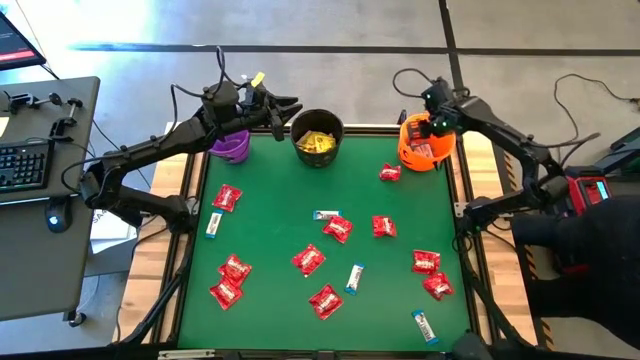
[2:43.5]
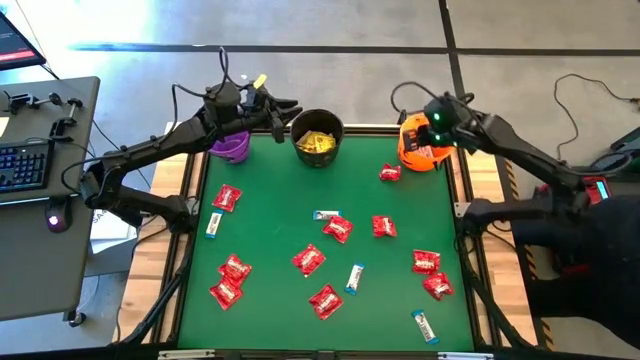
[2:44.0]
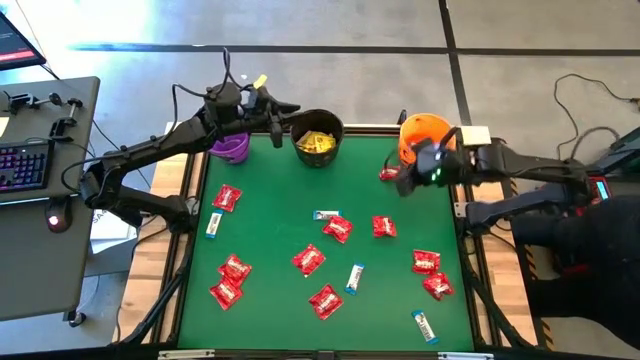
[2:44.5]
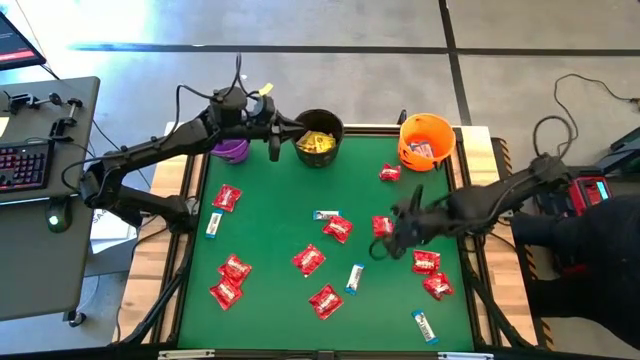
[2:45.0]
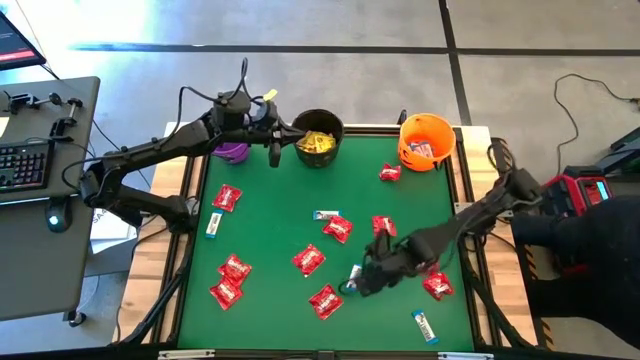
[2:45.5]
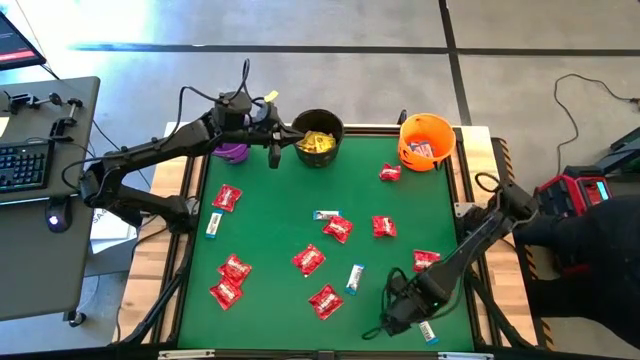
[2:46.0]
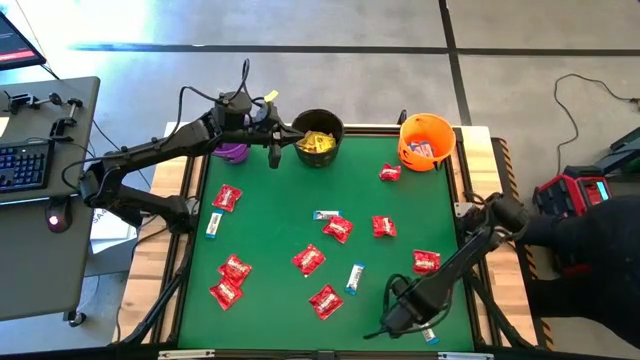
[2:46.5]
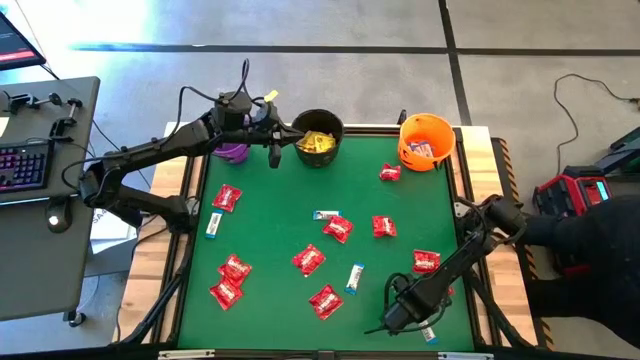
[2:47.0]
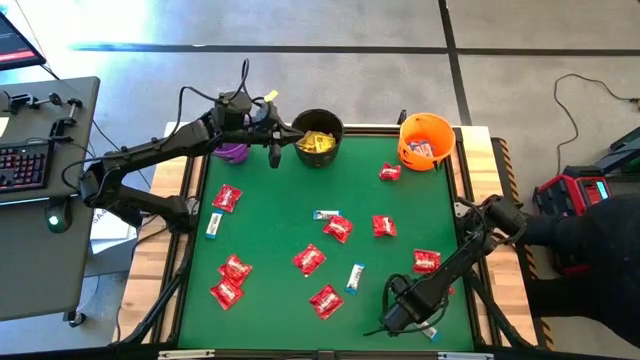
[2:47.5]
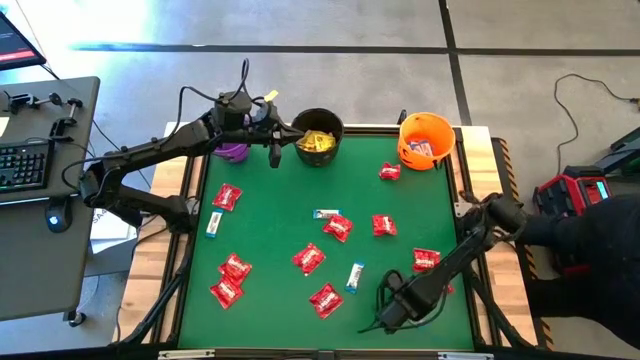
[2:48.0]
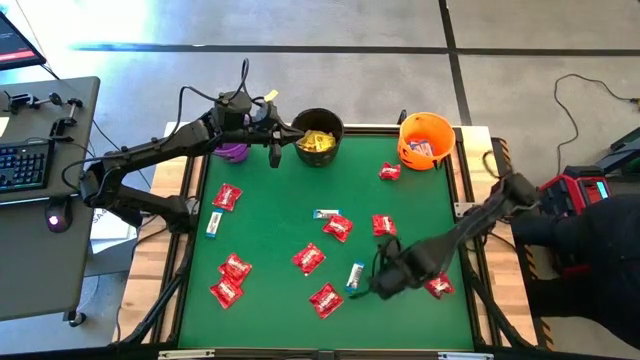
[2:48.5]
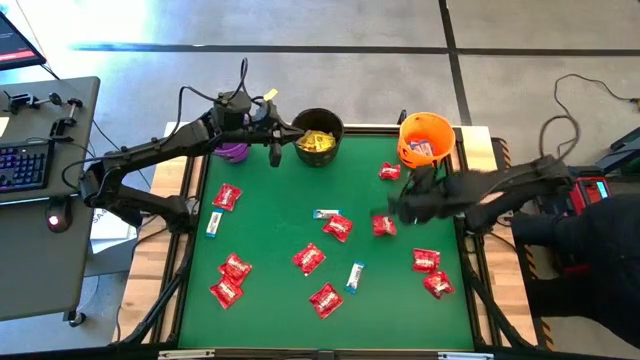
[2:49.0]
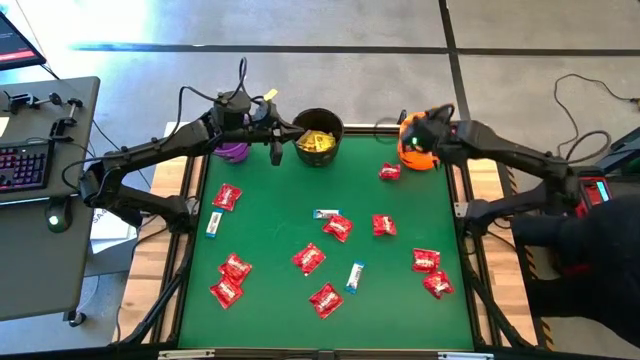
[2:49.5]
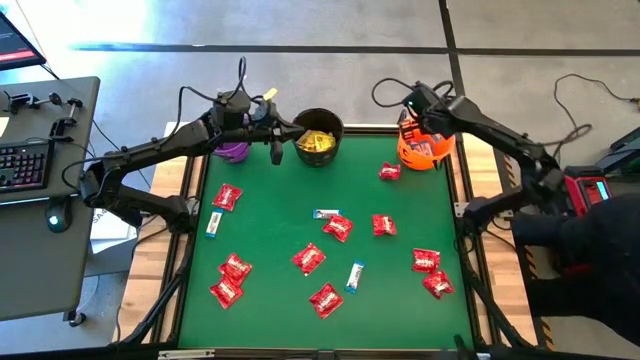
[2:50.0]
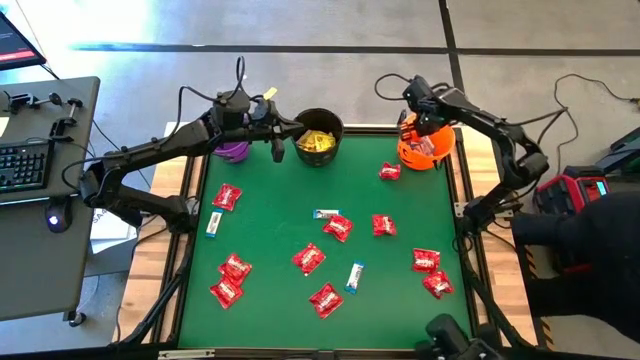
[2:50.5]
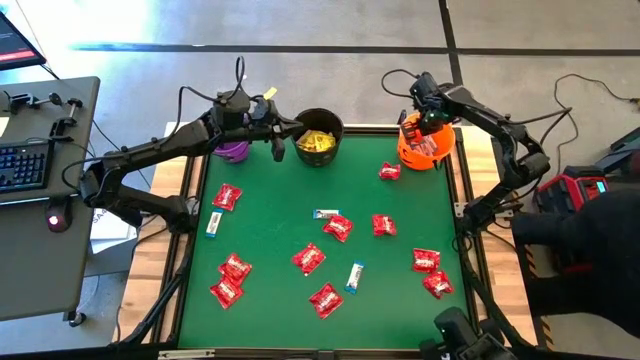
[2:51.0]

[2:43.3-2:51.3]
Task: Sort candy by brand, put in halloween buckets
Put the blue chocolate bar into the orange bucket

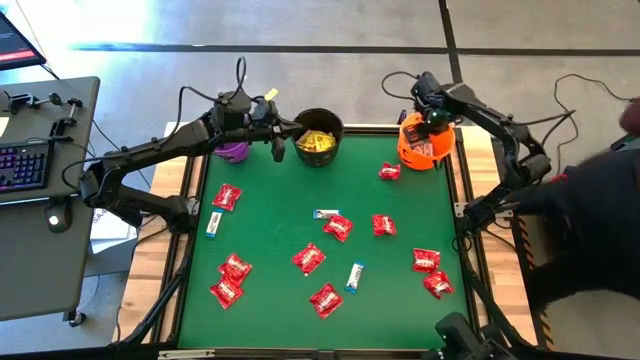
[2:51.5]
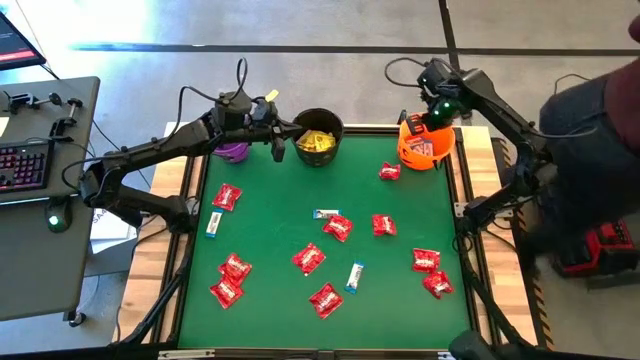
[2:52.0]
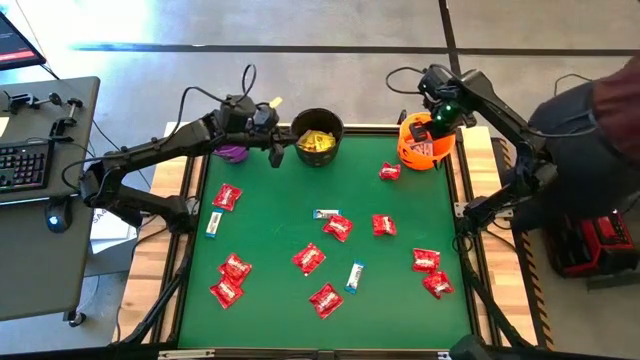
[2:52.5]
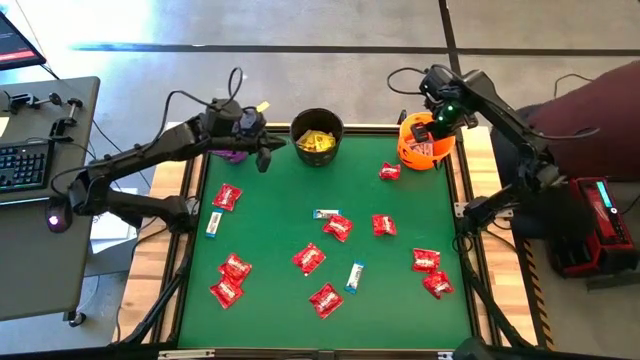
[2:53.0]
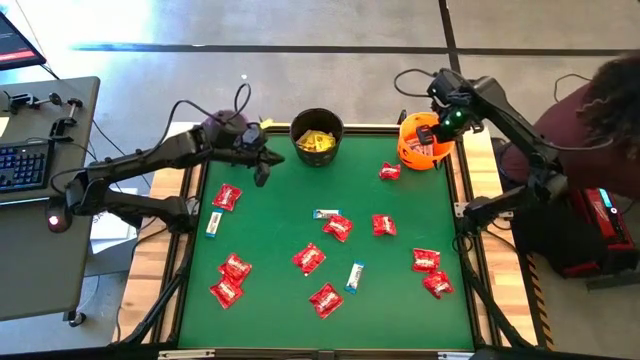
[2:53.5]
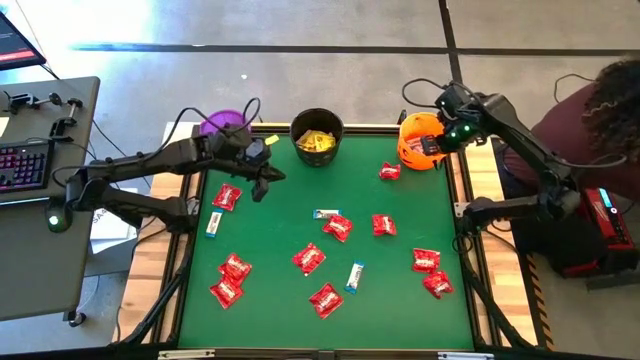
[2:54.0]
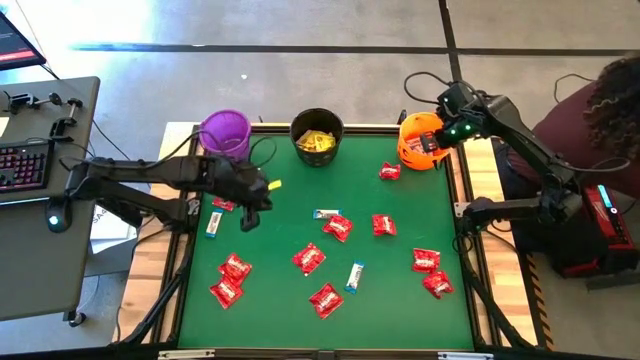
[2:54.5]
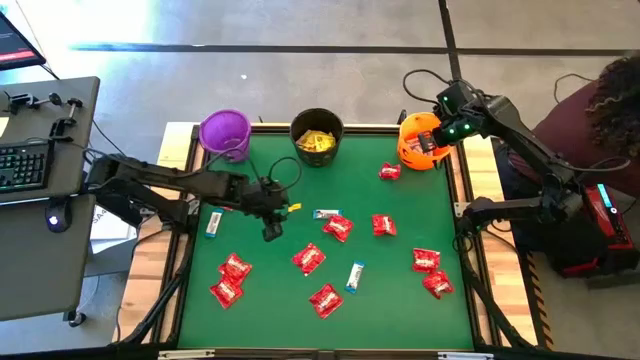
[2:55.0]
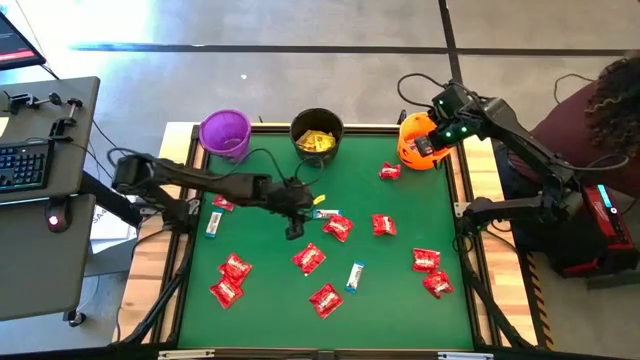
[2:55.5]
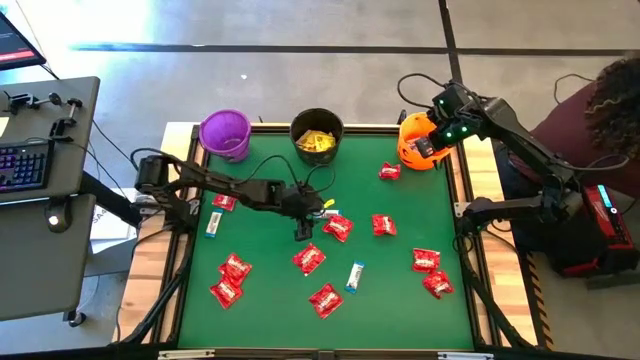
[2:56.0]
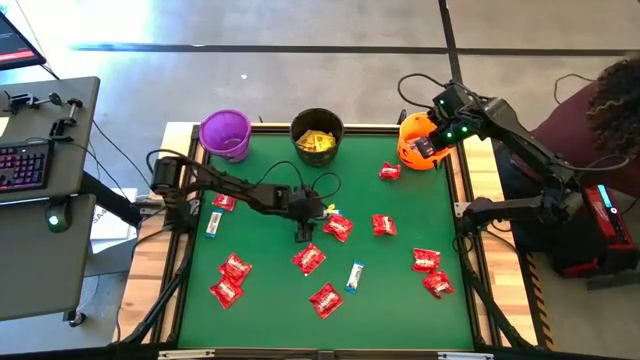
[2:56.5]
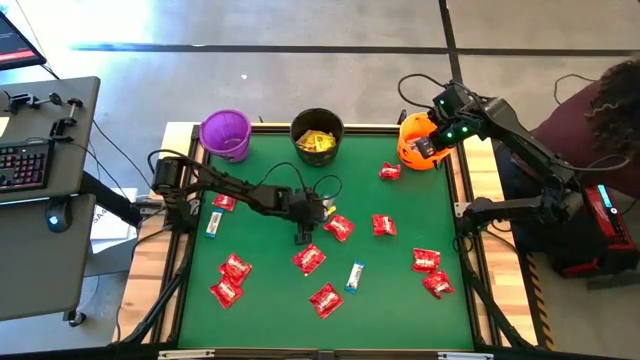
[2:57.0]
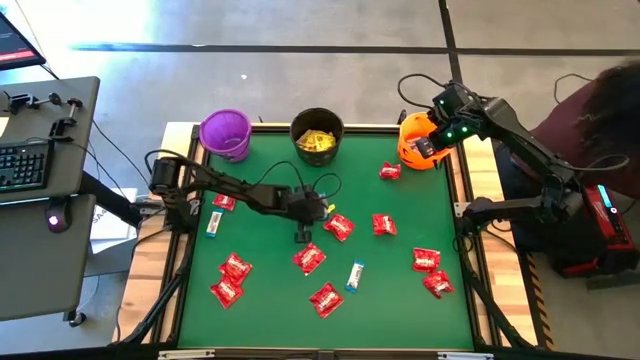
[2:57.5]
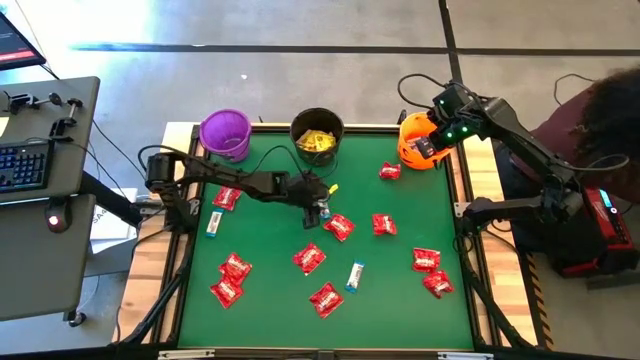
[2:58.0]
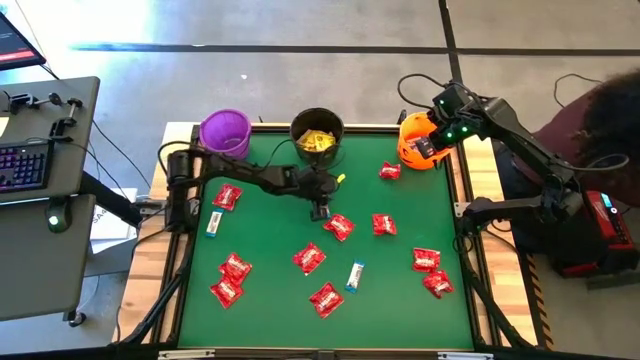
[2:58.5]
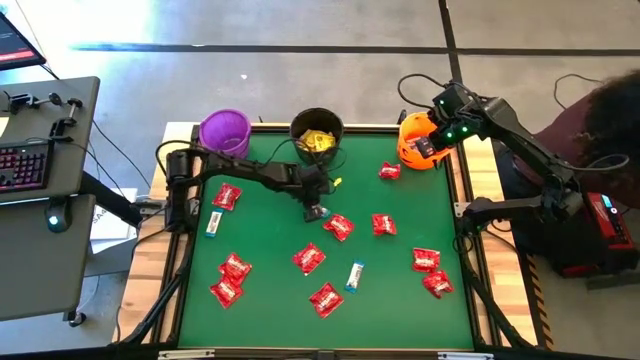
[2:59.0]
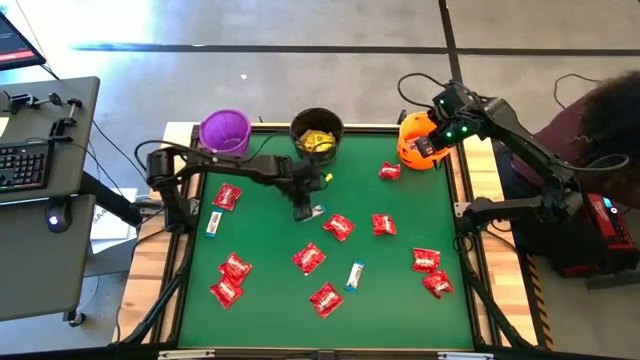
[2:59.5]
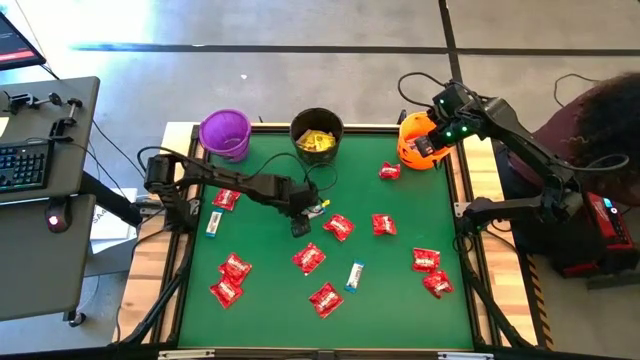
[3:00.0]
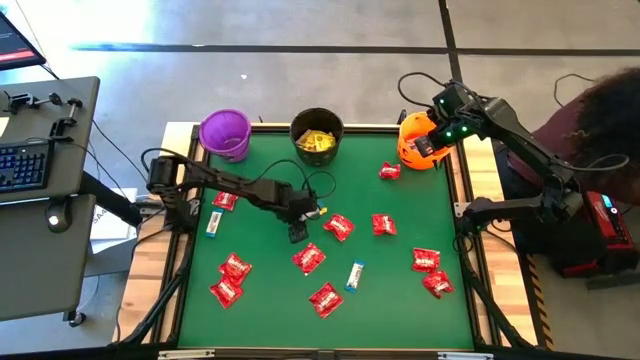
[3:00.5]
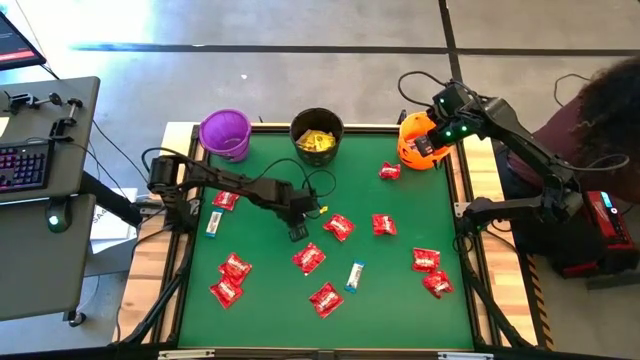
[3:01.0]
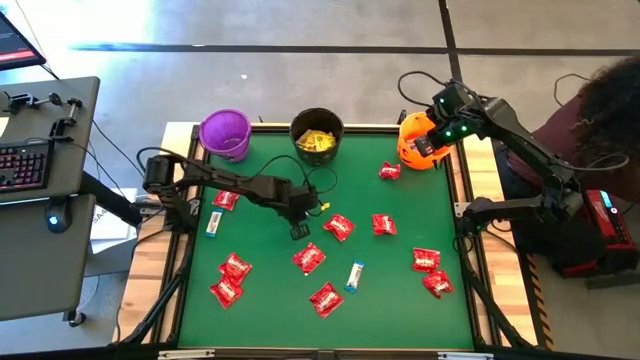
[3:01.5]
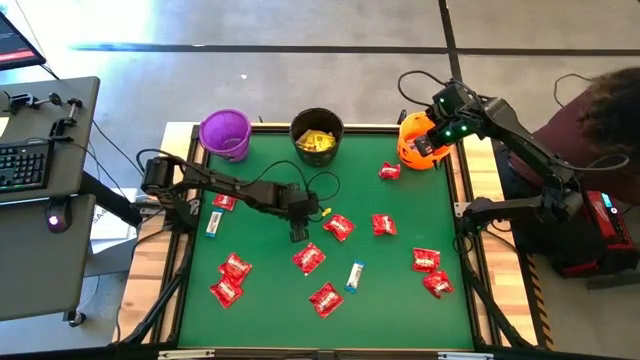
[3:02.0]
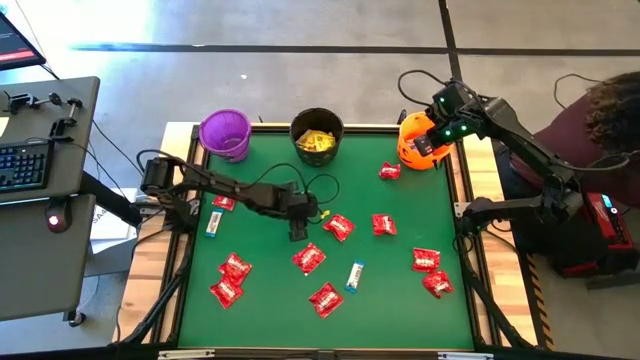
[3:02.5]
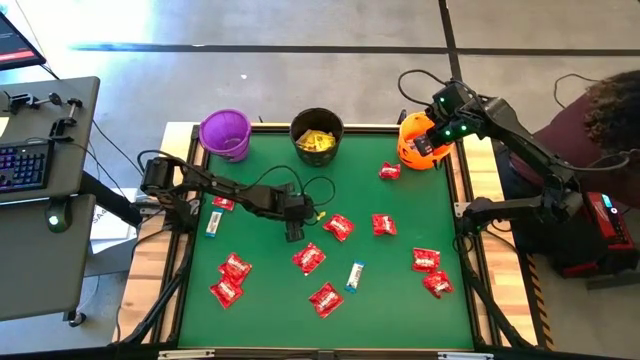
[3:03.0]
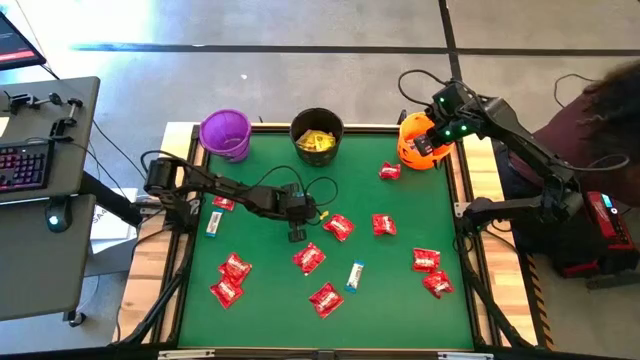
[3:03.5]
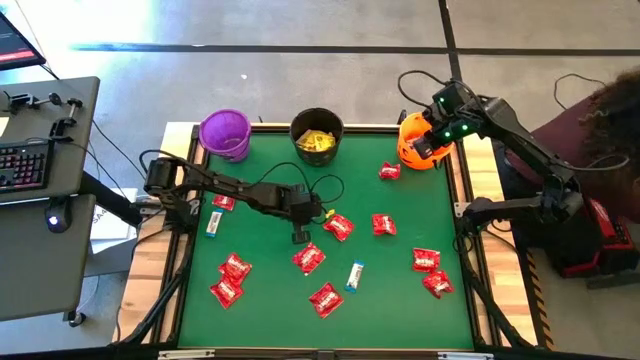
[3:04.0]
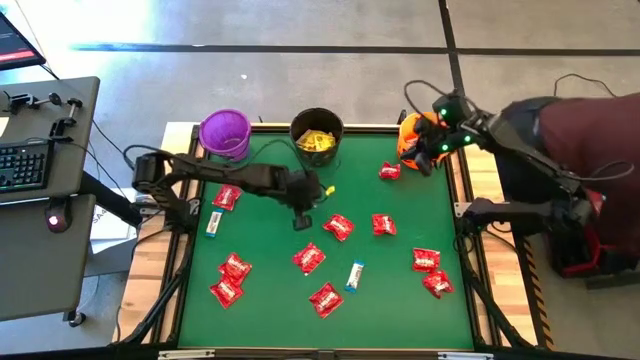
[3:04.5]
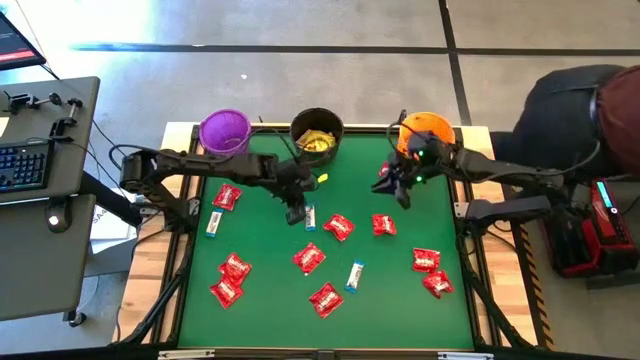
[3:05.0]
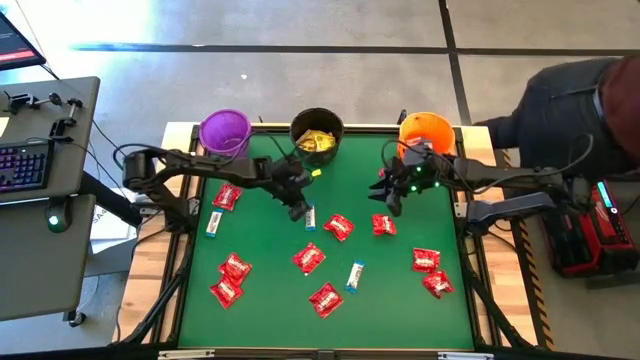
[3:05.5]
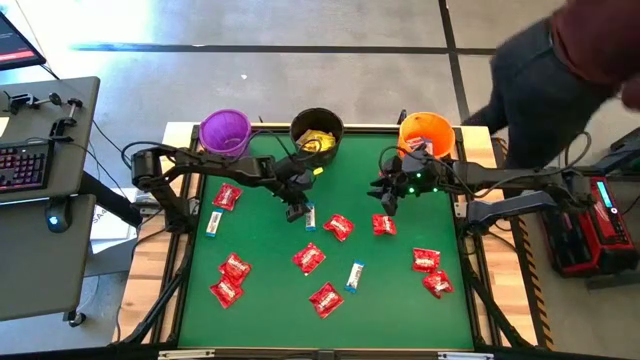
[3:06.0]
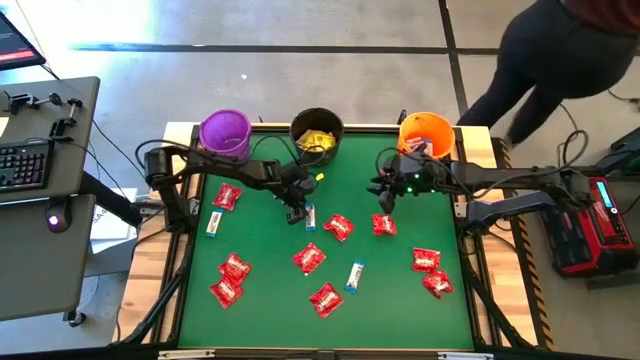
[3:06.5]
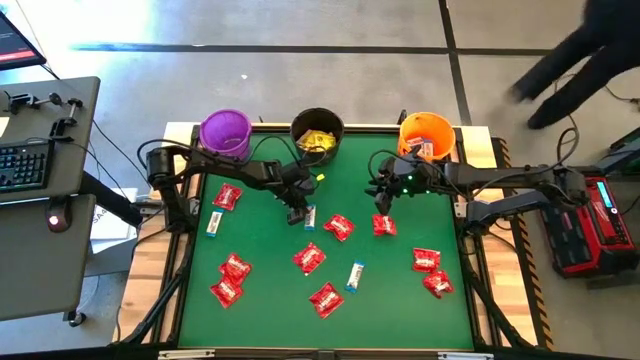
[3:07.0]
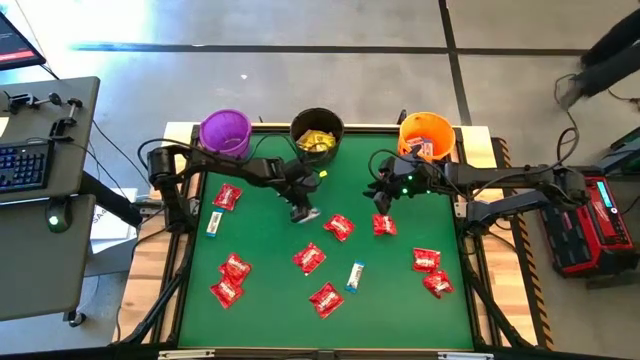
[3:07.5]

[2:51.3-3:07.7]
Put the blue chocolate bar into the orange bucket
